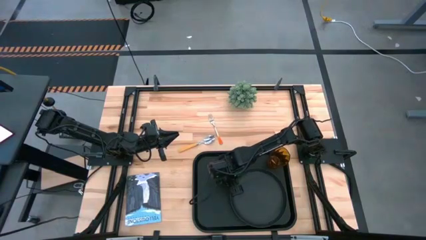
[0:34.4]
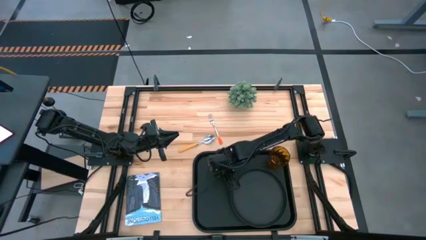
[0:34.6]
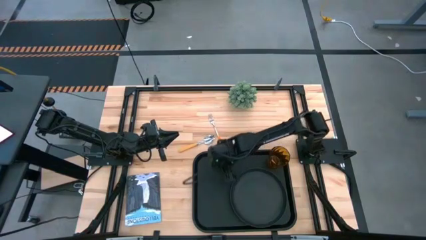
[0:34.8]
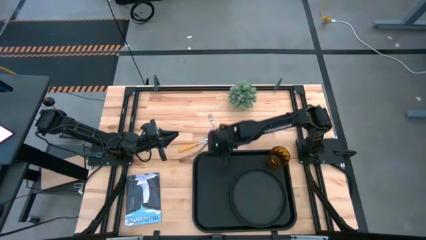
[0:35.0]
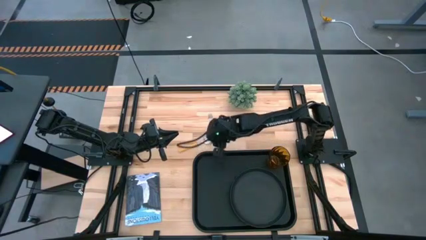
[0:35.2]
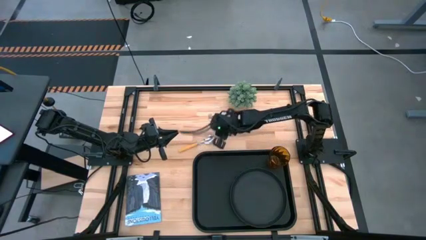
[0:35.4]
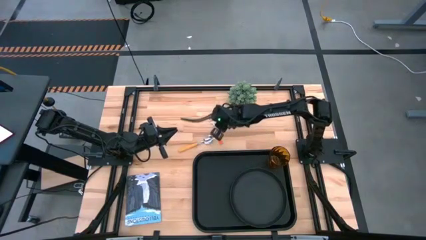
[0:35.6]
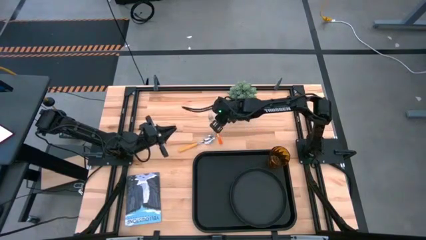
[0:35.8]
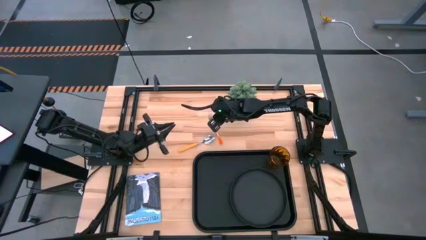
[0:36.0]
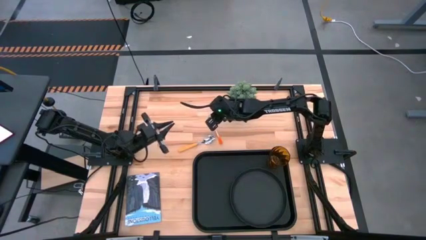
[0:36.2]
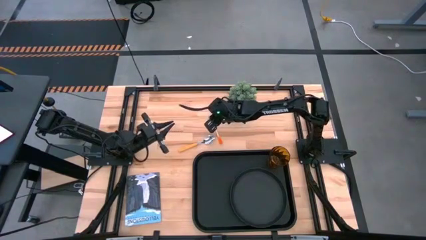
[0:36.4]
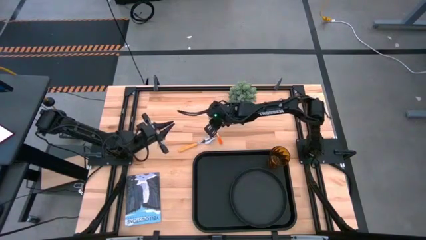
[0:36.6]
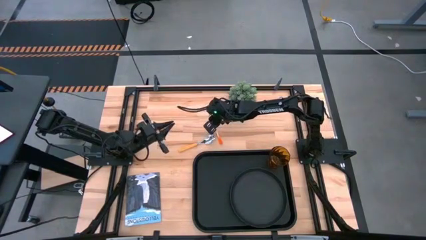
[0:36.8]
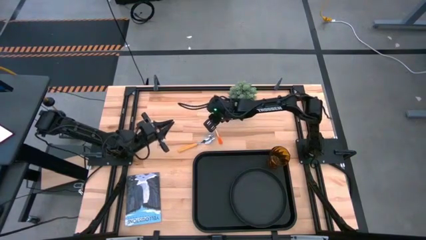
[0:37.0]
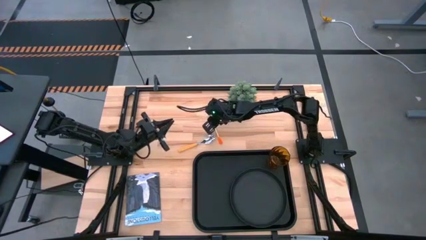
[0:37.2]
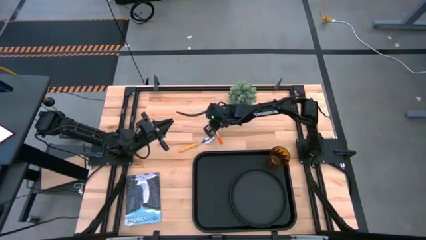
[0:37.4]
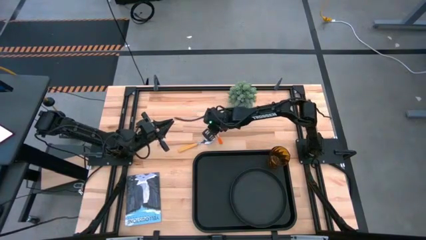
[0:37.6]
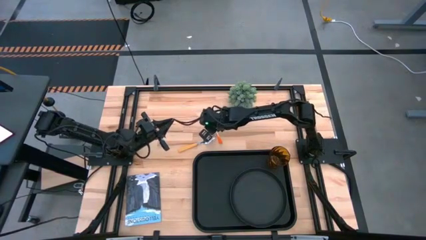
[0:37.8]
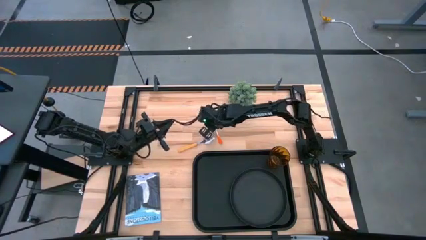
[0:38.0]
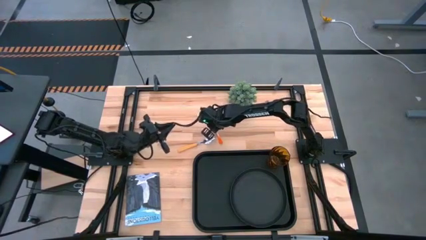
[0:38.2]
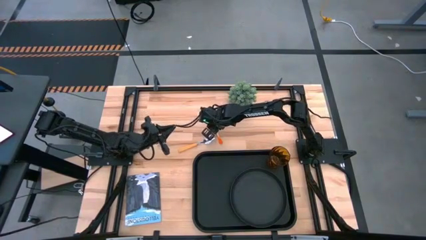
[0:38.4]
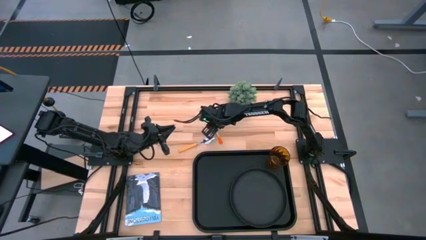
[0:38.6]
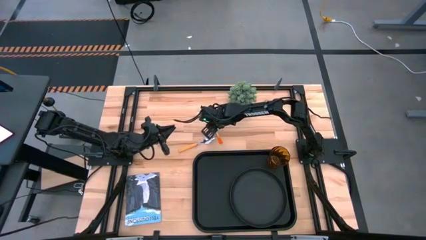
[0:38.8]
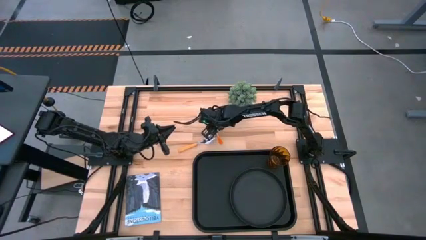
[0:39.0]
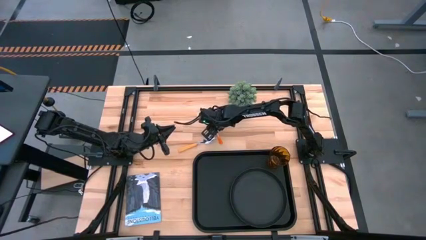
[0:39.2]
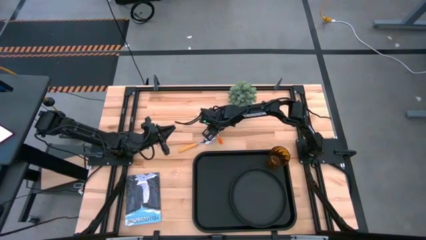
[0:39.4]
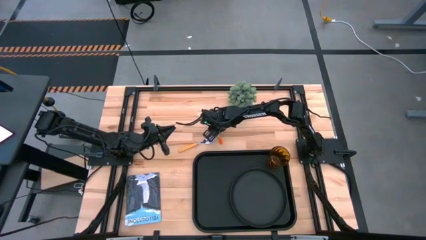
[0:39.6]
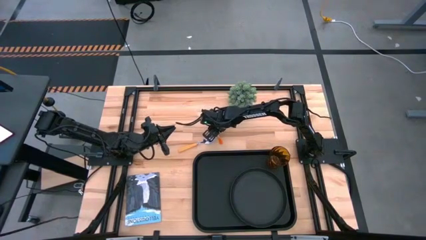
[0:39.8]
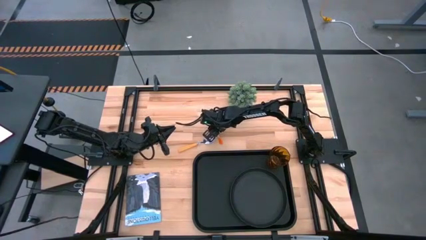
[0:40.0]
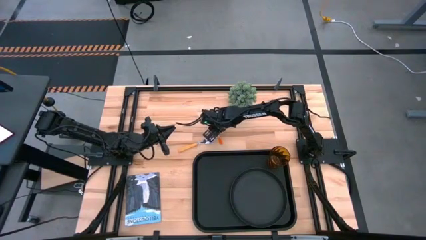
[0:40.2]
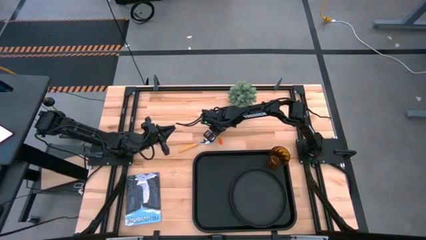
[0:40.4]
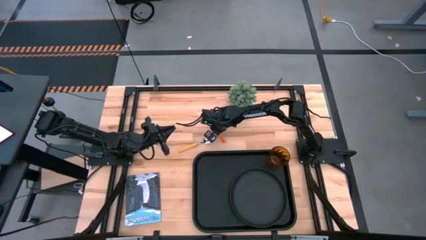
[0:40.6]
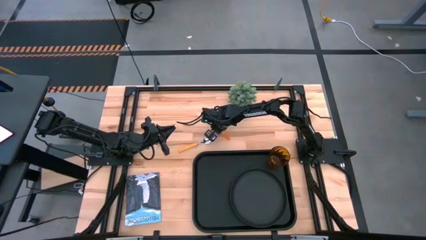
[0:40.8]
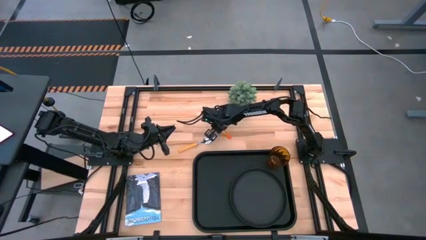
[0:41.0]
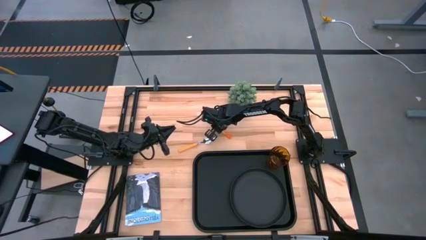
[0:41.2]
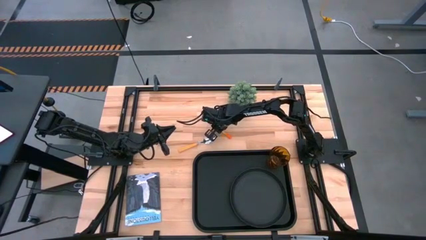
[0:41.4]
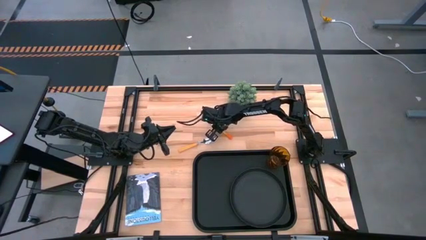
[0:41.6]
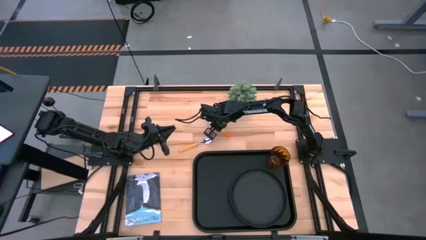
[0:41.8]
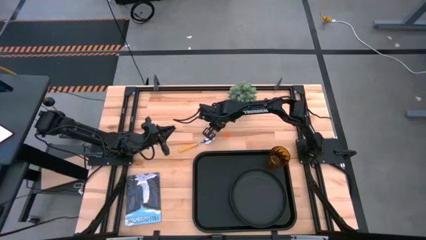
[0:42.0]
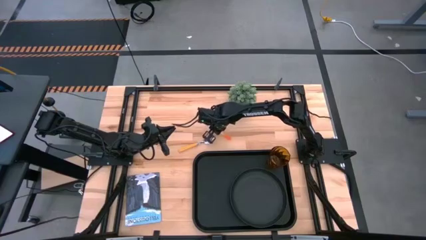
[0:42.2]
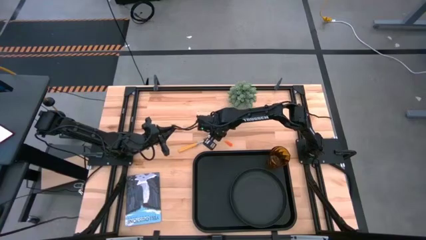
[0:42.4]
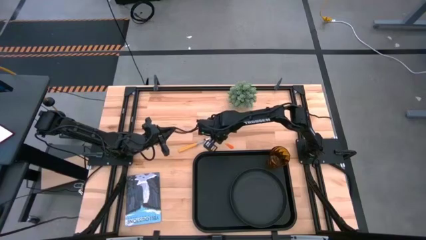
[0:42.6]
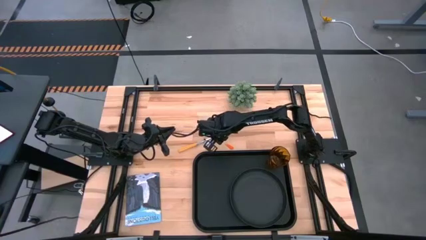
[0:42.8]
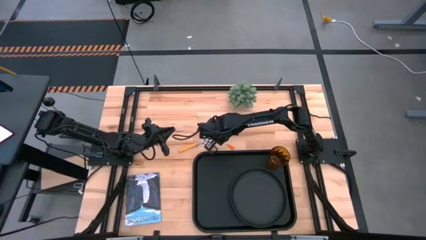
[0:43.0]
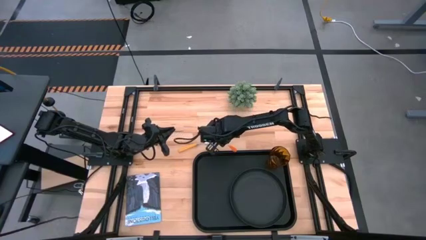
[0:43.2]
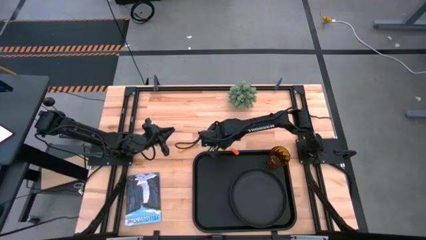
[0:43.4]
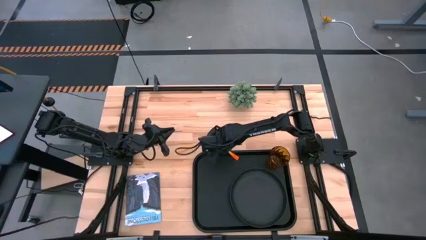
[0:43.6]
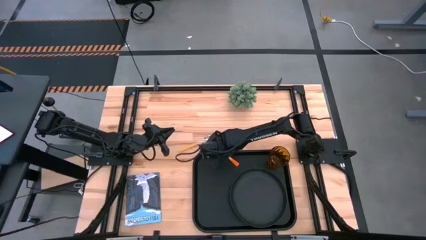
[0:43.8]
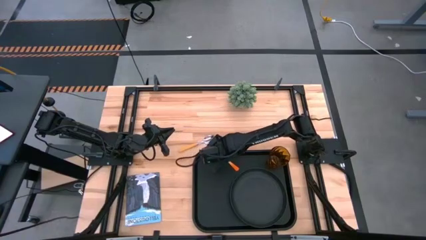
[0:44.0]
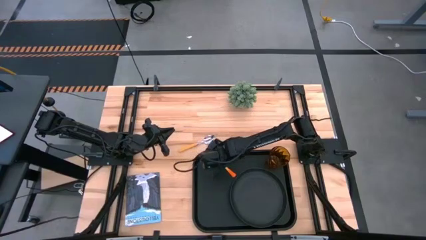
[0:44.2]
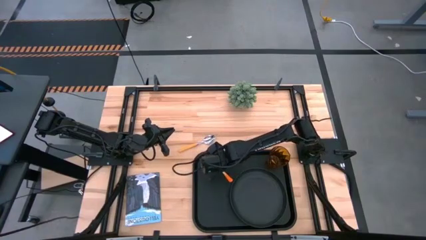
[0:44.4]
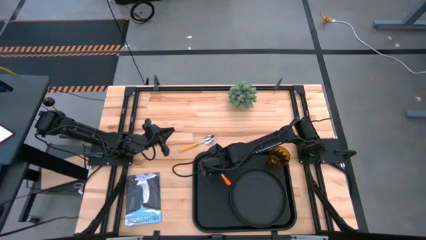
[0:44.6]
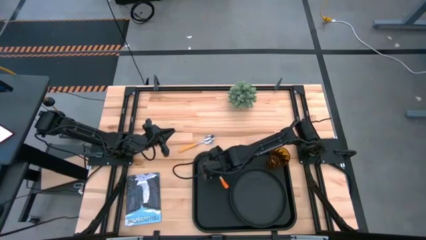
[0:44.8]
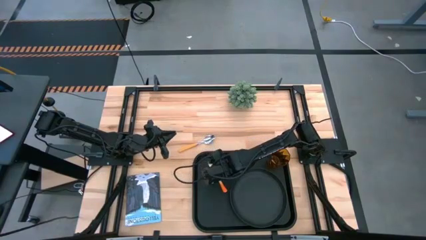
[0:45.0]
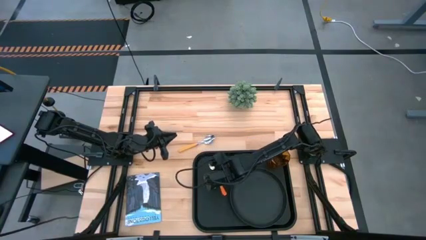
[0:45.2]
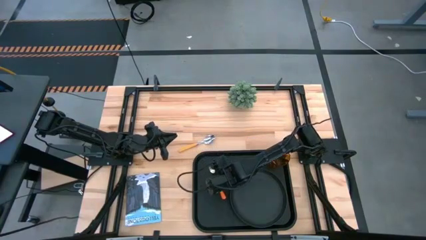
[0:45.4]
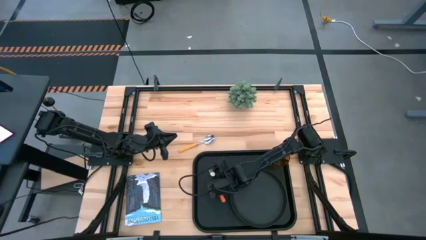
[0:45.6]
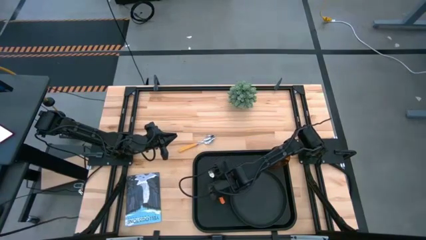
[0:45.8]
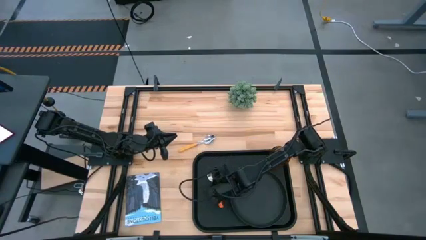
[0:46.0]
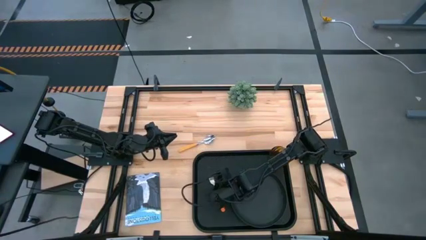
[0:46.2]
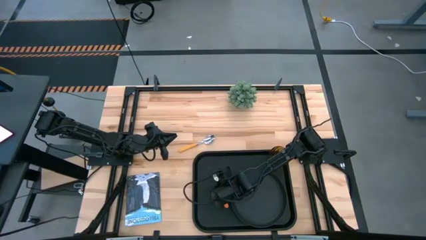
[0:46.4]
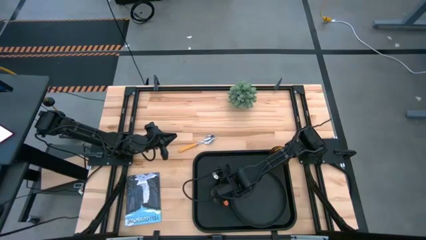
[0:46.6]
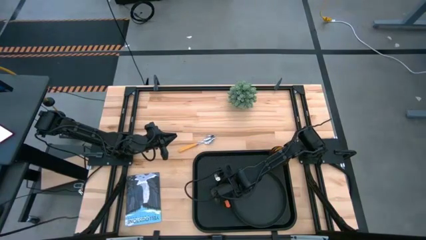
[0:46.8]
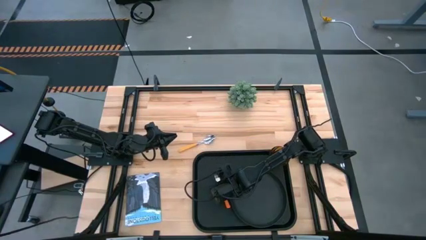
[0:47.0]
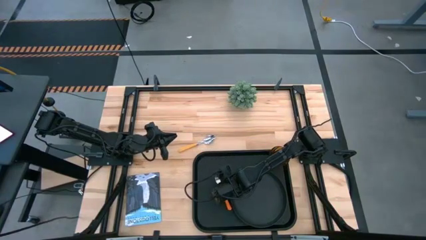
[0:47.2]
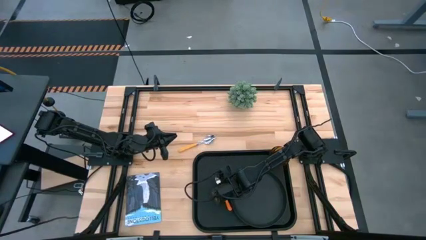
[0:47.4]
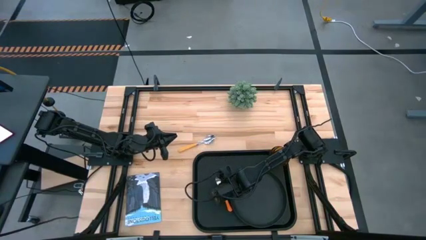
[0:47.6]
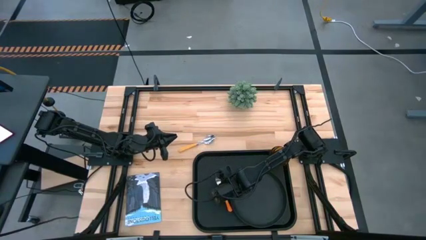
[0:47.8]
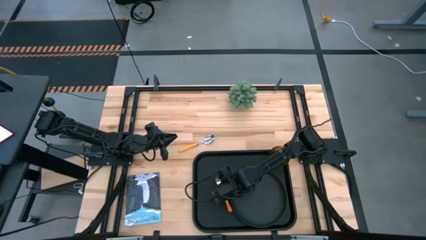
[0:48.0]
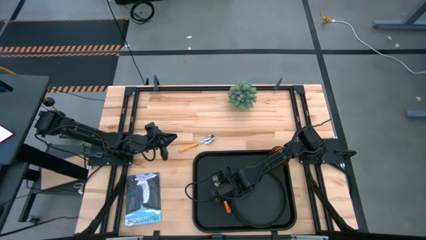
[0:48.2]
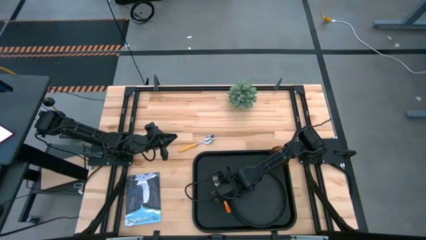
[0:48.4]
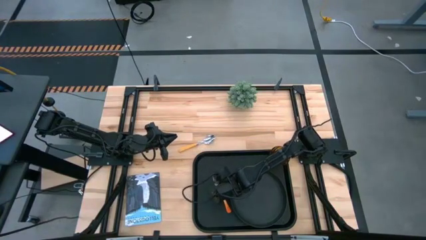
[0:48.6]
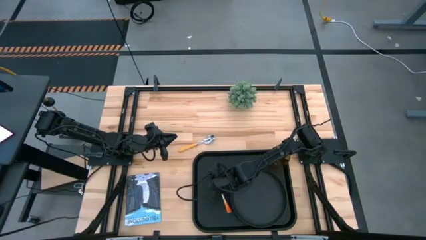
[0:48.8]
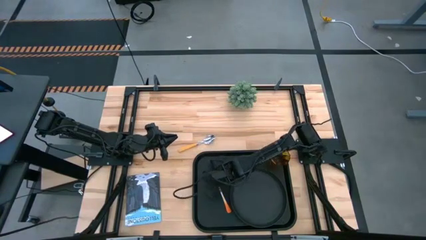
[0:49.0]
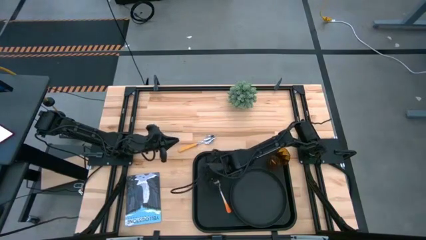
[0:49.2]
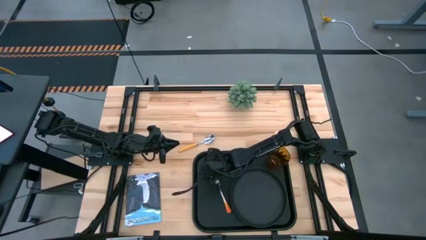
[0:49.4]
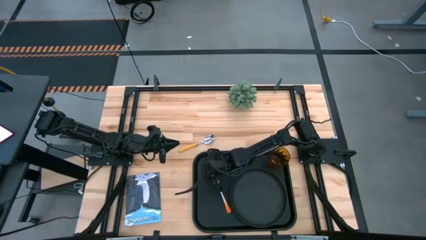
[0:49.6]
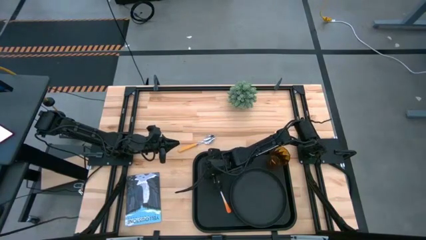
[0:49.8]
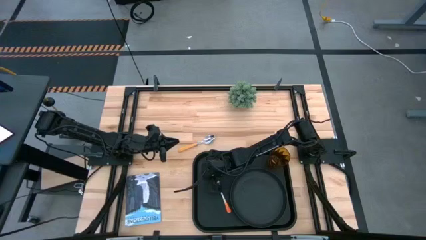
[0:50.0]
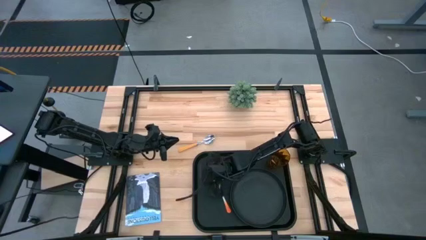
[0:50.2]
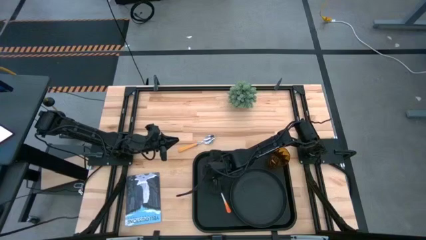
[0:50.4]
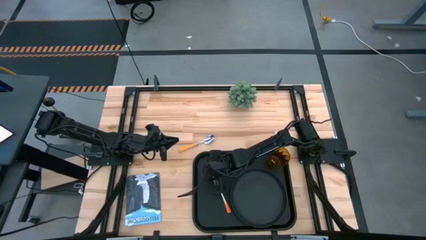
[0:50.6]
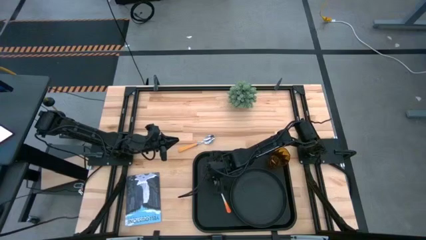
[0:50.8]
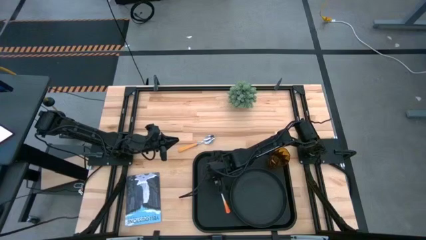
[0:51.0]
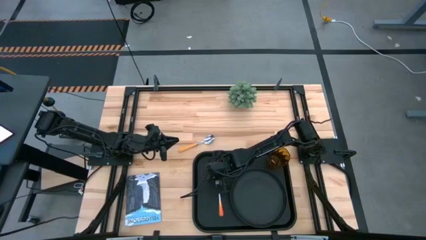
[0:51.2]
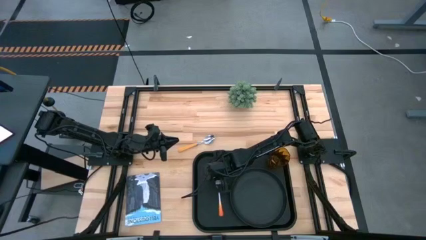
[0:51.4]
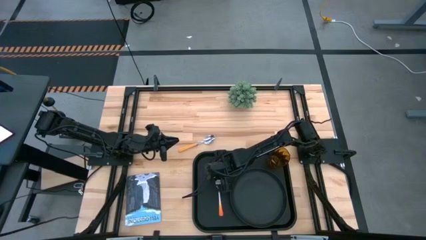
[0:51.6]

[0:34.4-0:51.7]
Task: Pick and place plate/cup/fork/spoon on tray
Put the orange fork beside the black plate on the black tray
